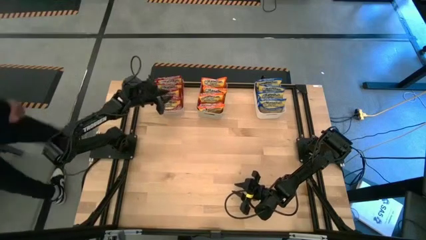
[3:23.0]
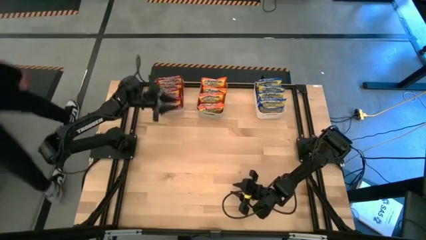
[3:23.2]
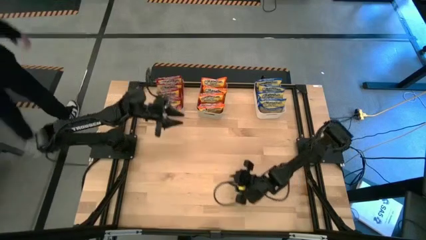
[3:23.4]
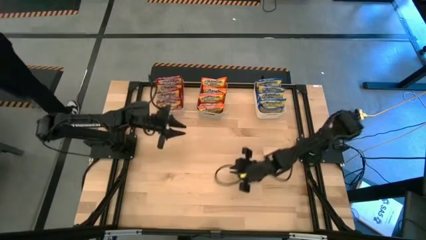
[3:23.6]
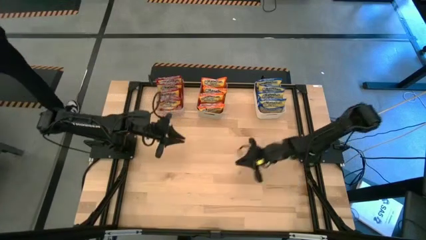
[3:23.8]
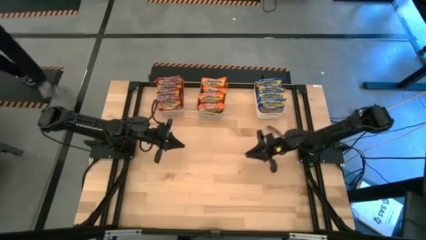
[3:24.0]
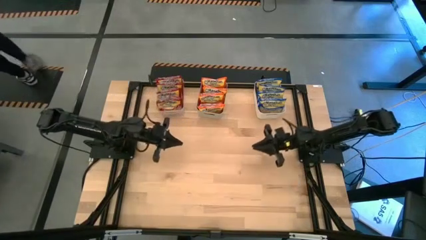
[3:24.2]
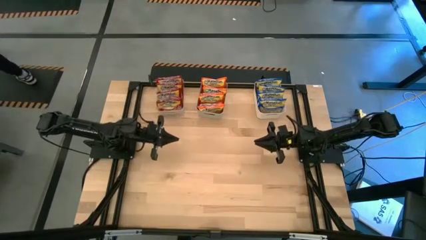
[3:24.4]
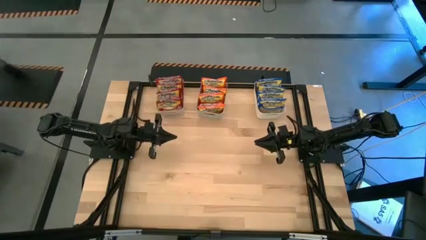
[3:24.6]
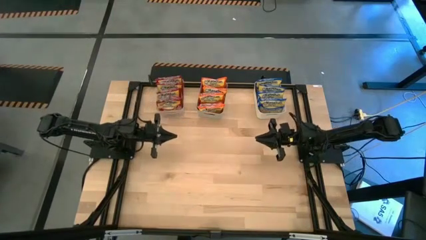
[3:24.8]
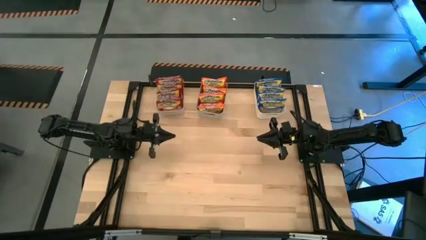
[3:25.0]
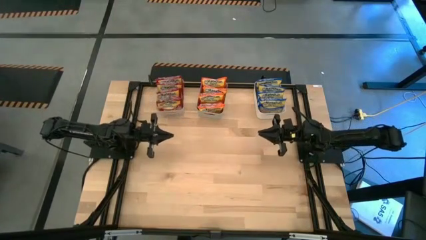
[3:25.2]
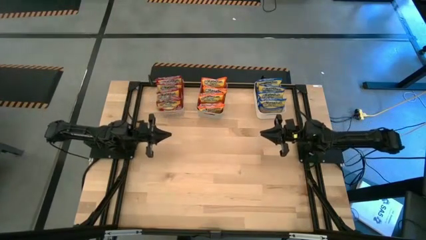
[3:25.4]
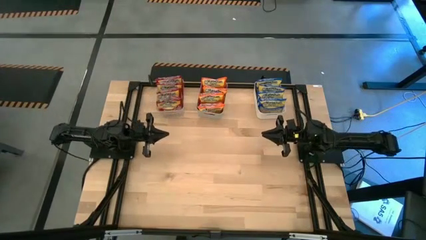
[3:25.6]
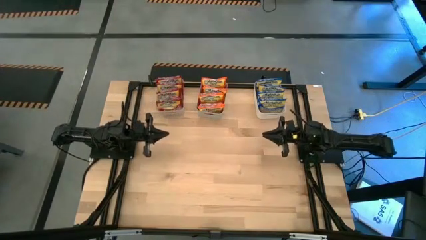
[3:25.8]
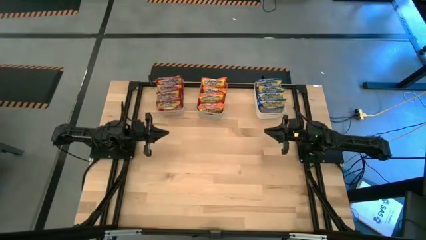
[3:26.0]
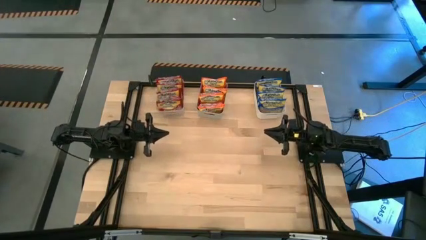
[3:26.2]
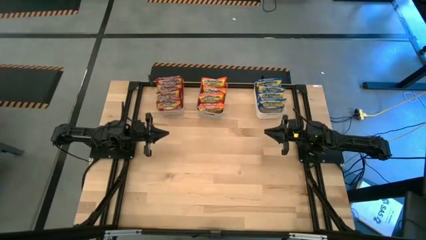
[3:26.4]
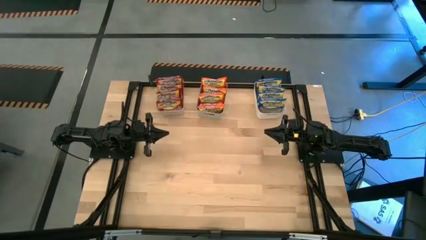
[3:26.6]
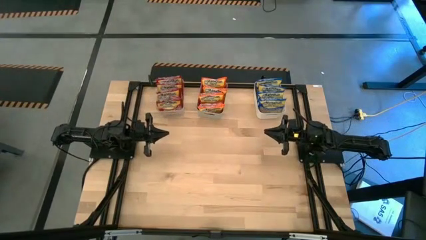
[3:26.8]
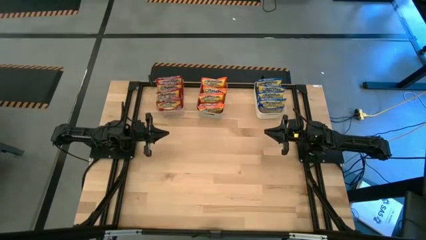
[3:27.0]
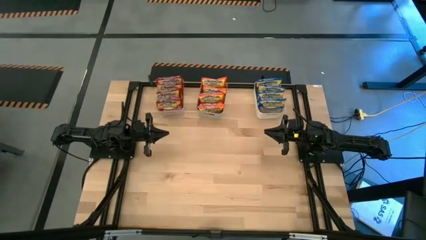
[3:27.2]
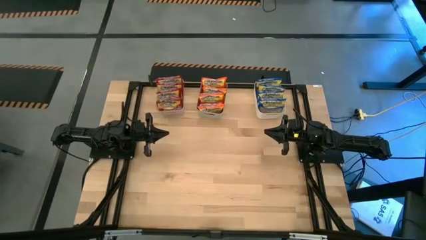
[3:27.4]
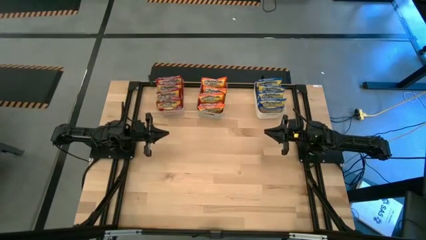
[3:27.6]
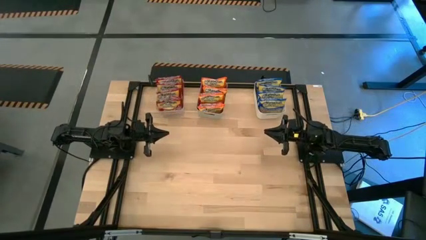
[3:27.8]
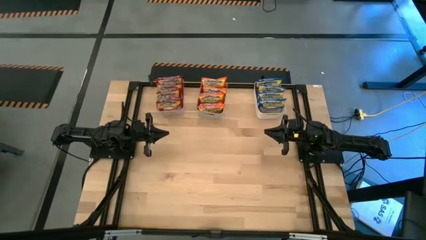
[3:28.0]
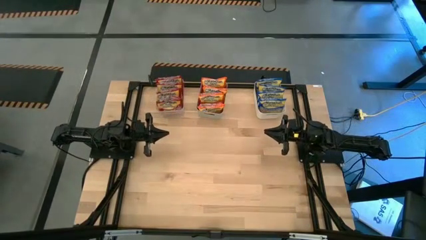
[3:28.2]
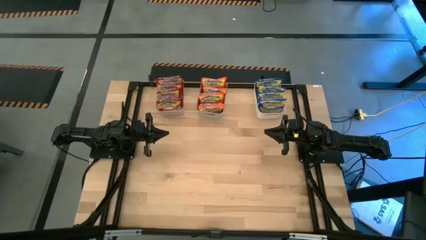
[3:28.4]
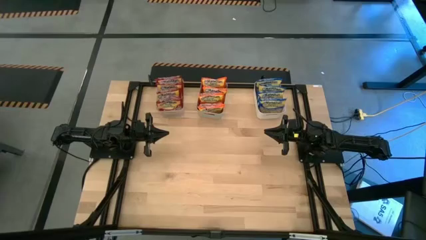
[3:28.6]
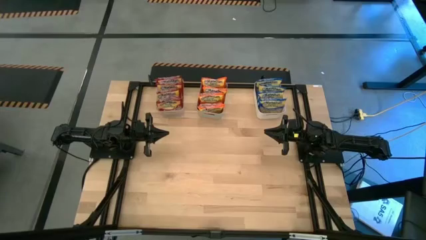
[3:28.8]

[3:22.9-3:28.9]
Task: Sort Maruchan noodles
Return to Home Position

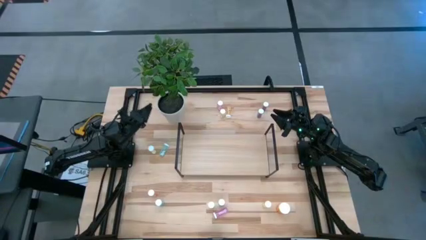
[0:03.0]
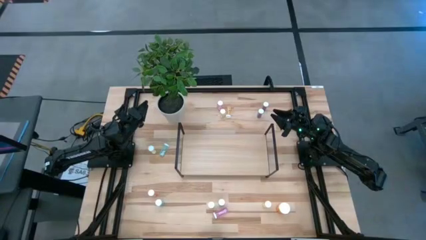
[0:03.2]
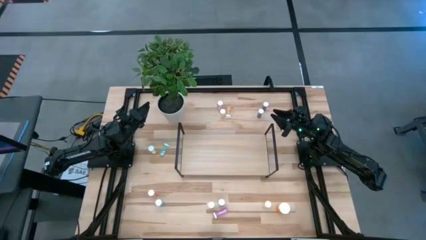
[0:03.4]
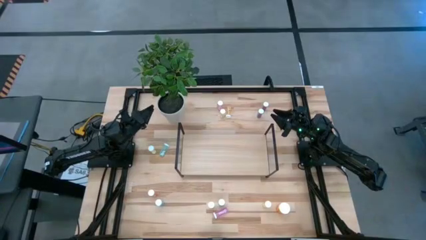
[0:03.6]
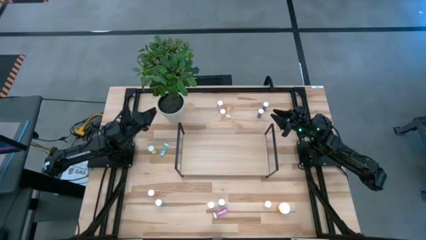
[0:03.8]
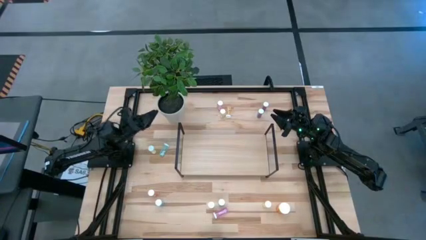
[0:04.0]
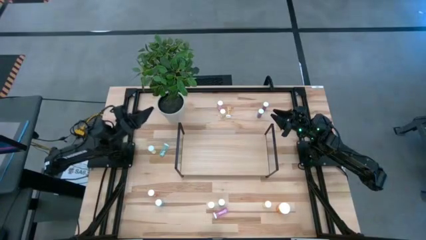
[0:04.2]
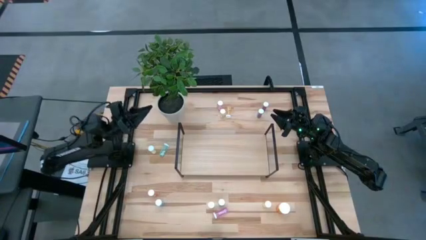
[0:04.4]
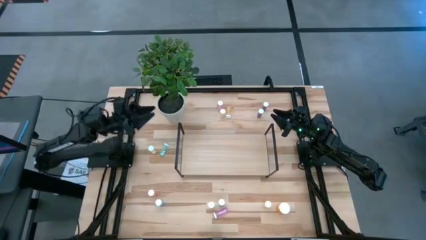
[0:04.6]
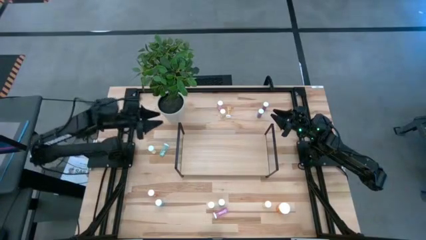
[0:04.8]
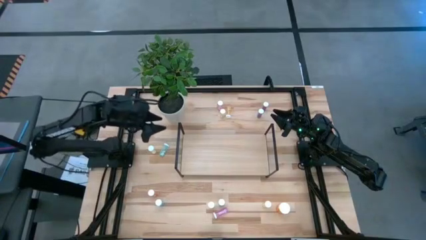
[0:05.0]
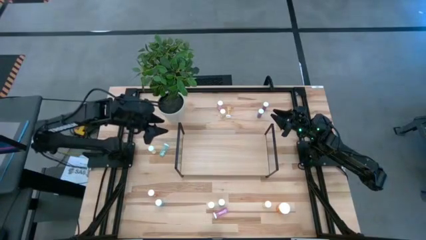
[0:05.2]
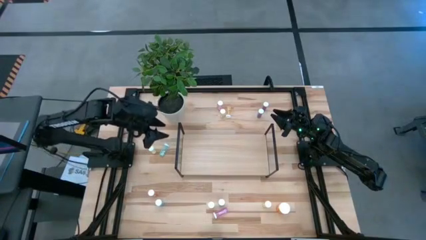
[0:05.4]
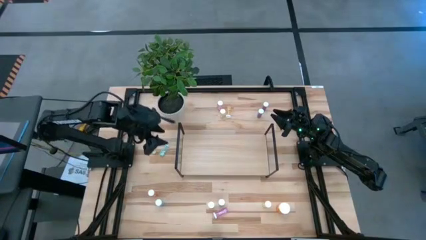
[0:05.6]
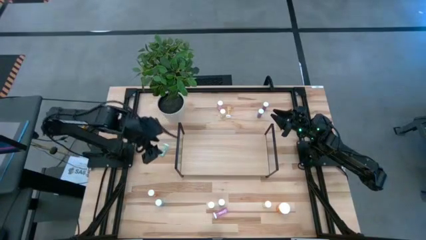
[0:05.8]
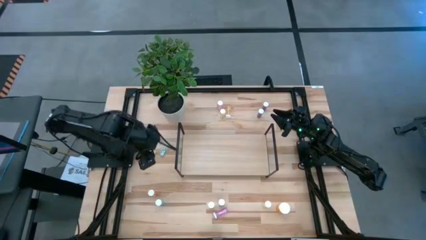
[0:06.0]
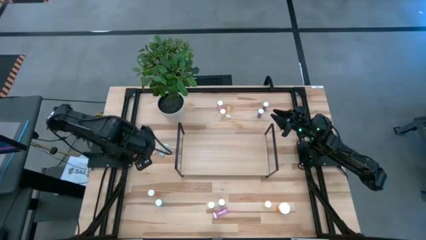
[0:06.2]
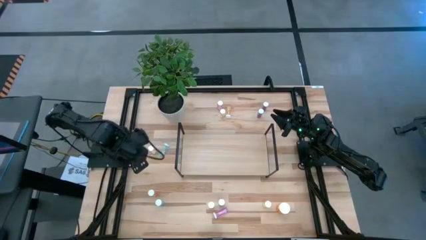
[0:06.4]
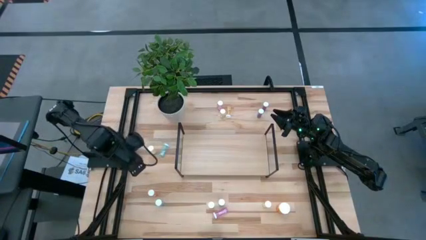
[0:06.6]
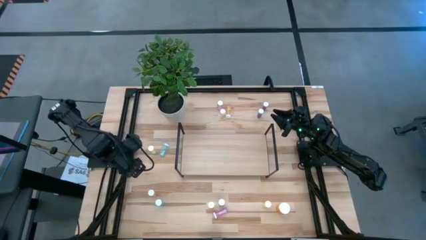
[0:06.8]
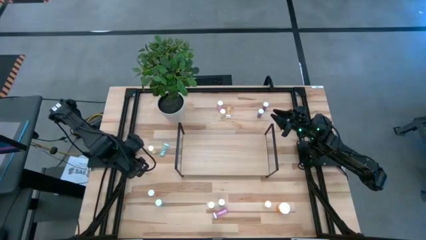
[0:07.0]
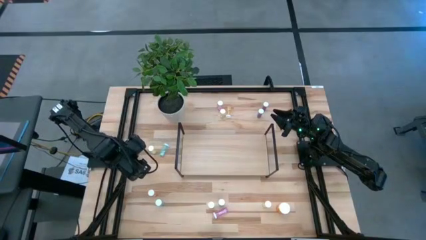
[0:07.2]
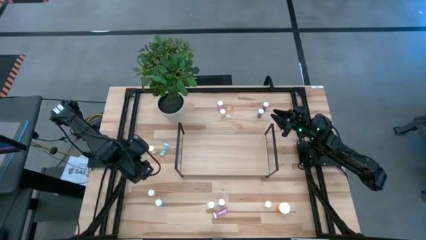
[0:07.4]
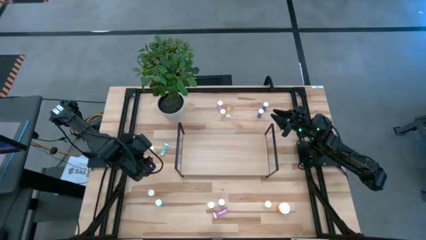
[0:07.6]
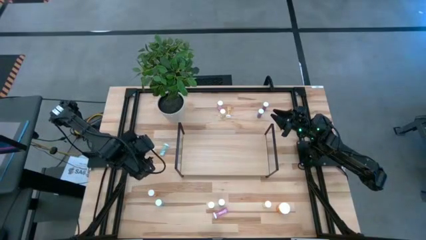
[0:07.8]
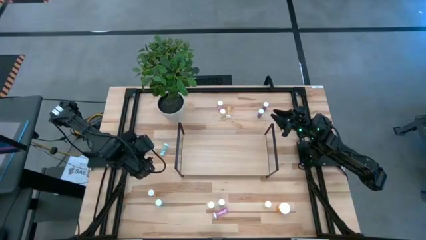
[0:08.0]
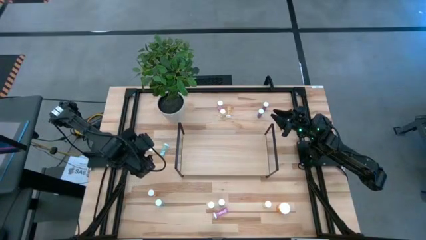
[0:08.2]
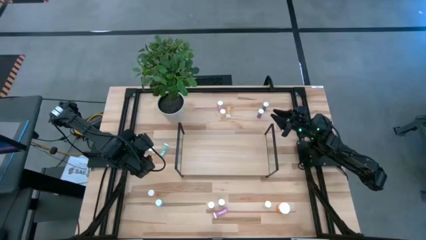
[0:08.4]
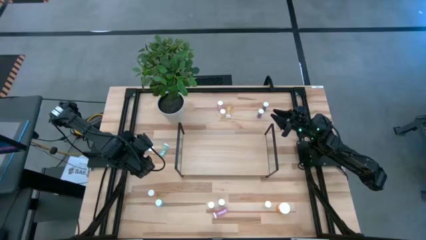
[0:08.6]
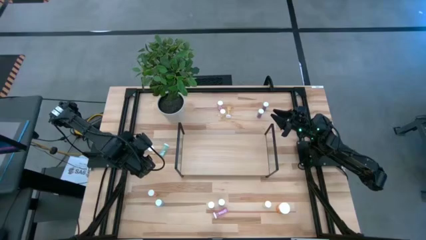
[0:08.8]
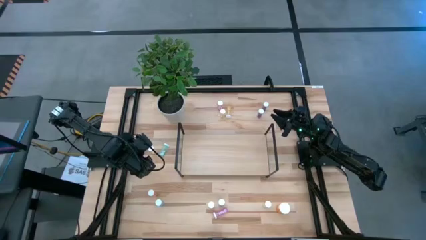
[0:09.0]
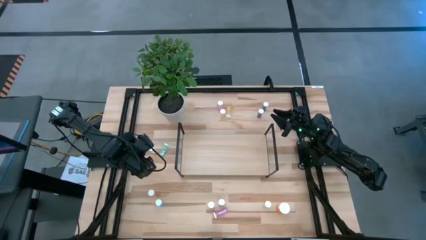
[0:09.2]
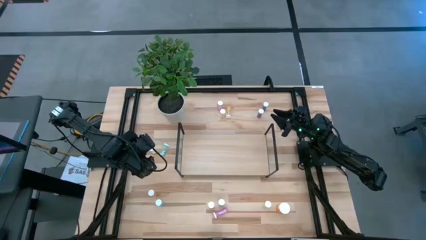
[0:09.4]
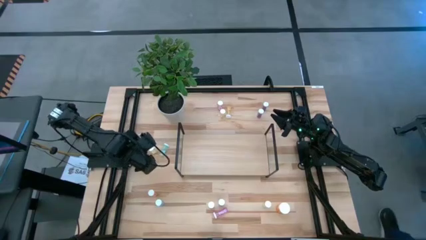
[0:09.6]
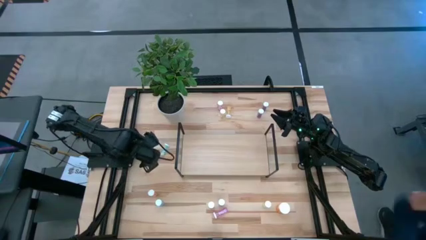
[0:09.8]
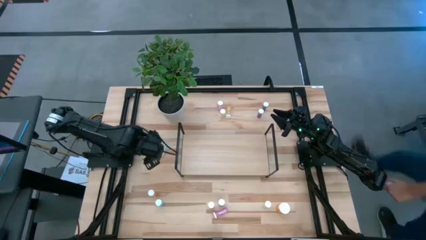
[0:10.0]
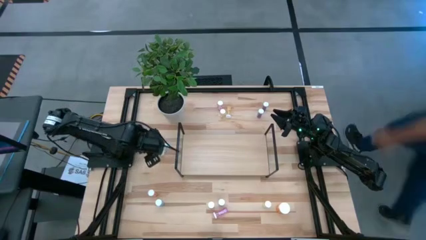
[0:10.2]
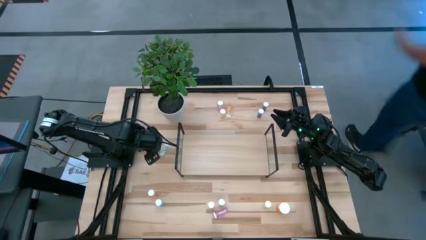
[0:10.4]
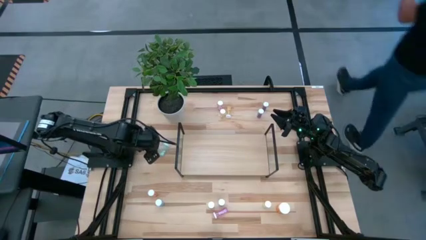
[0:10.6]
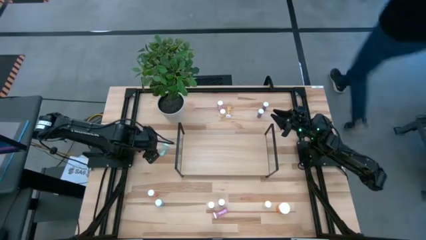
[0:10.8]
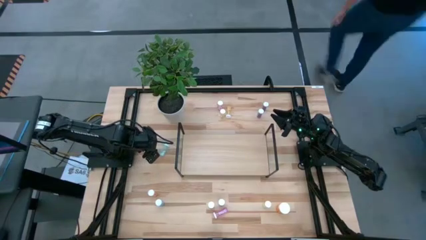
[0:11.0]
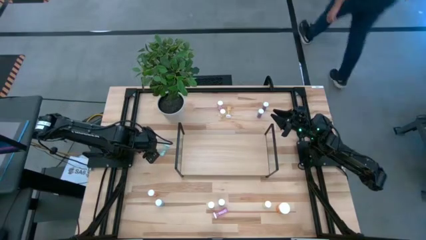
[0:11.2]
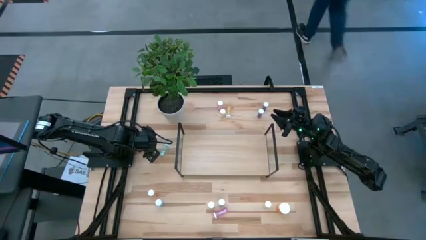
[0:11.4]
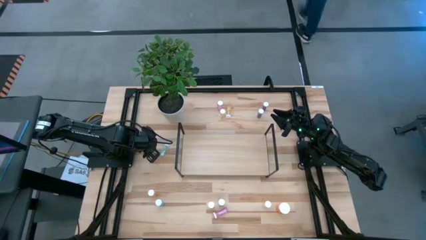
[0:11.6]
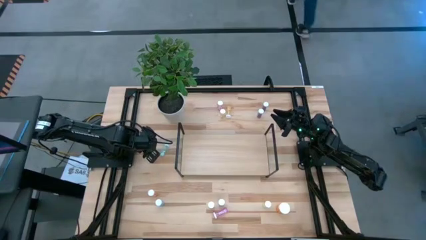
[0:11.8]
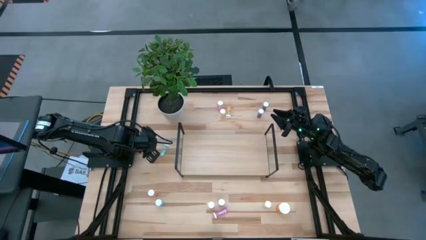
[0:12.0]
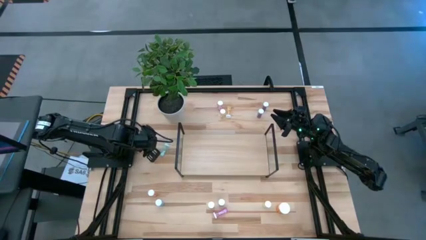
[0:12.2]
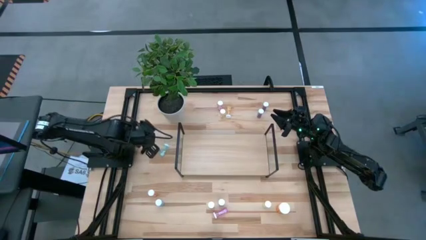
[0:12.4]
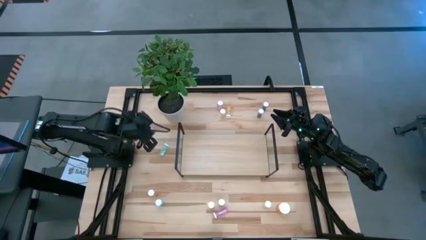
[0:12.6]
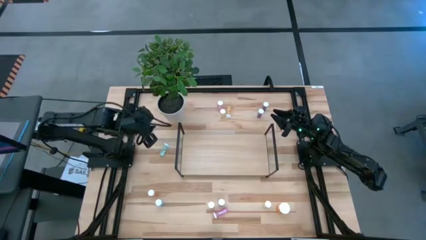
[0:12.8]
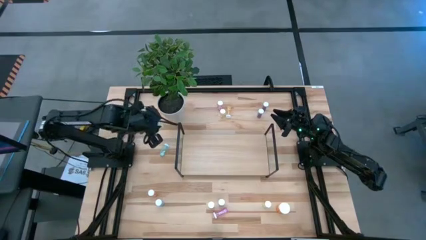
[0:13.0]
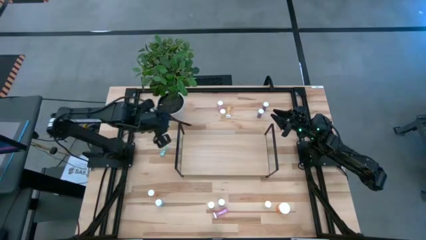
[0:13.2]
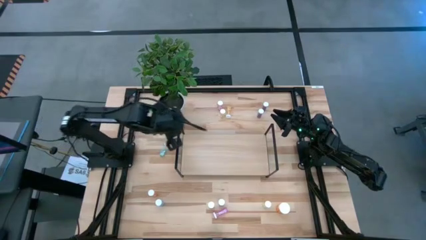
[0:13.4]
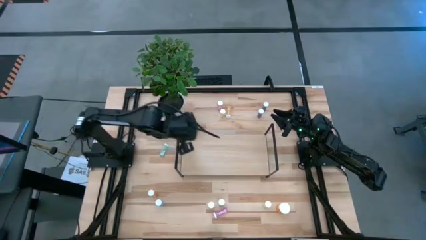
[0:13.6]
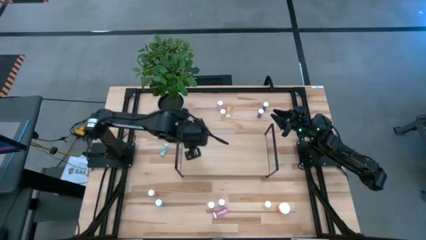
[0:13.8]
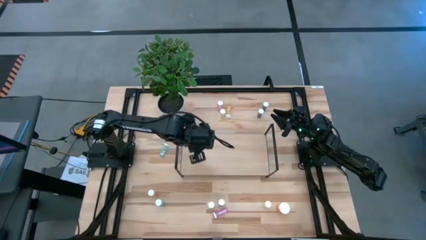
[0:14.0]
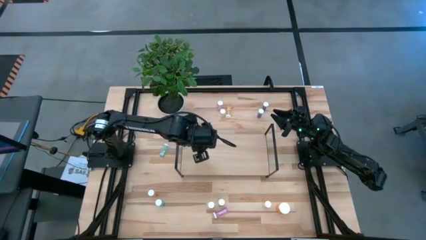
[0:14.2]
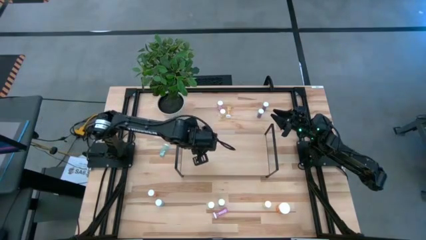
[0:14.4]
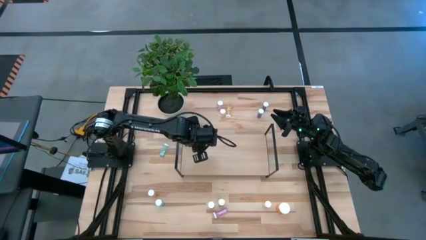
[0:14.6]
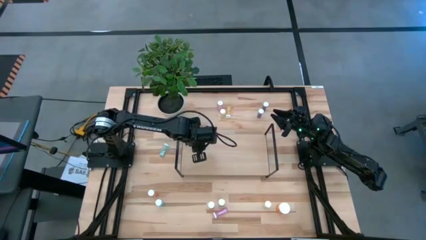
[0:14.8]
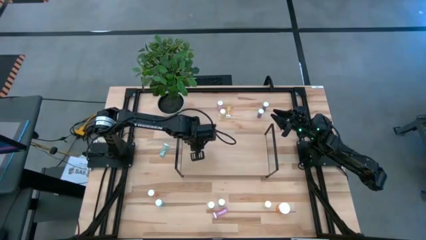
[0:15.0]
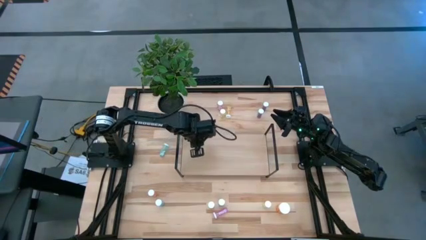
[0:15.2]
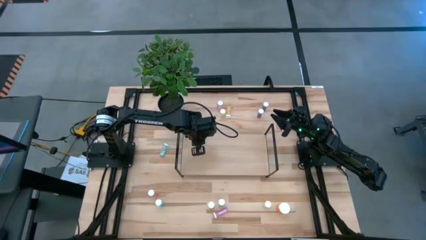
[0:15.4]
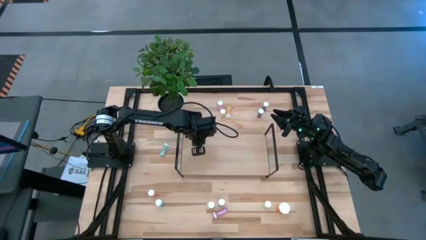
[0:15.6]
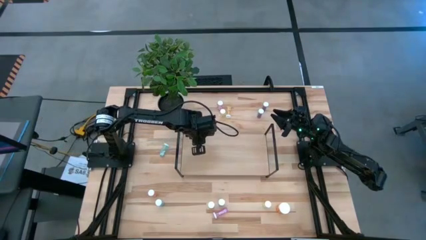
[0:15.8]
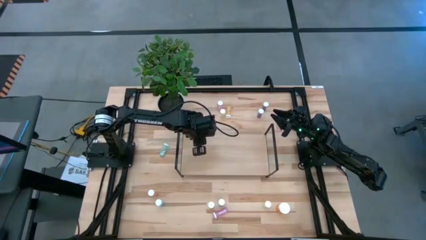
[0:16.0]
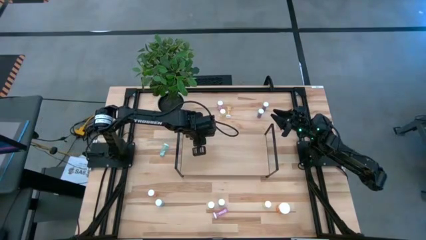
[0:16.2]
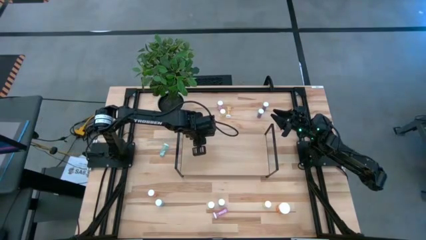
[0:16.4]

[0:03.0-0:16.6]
Task: Pick and place medicine bottles onto shelf by color
Put the yellow pill bottle on the shelf
